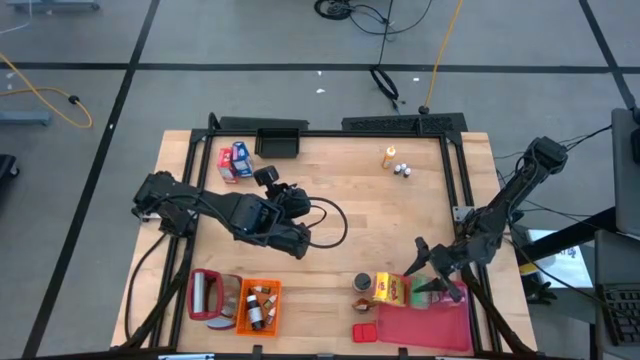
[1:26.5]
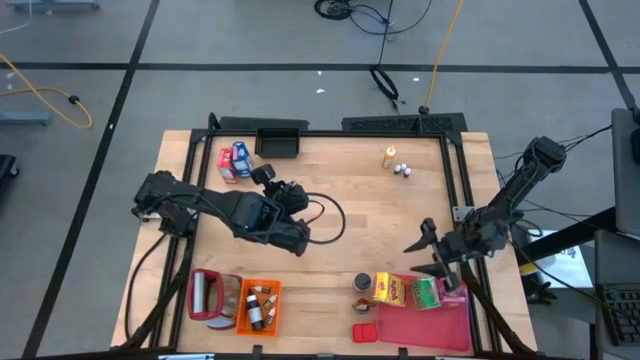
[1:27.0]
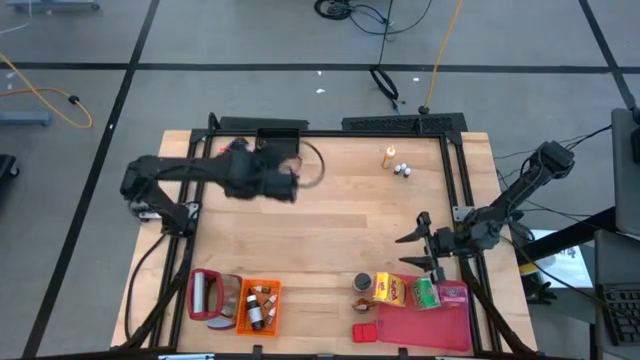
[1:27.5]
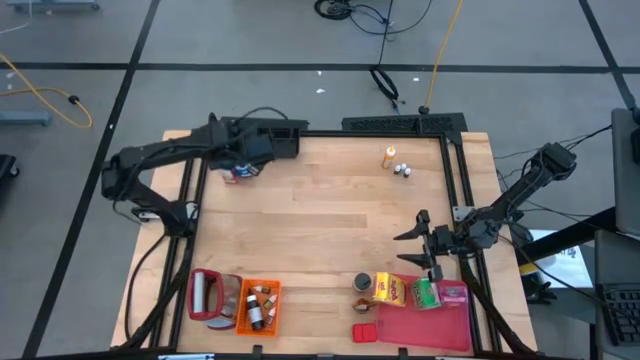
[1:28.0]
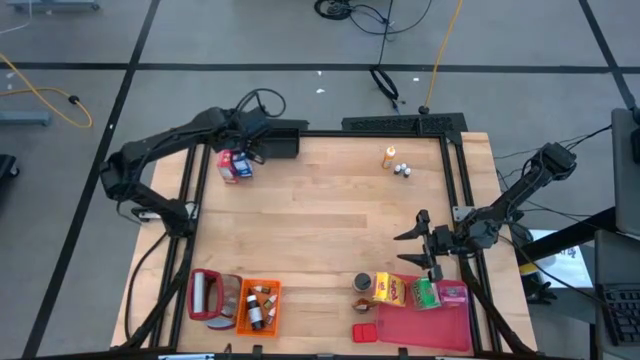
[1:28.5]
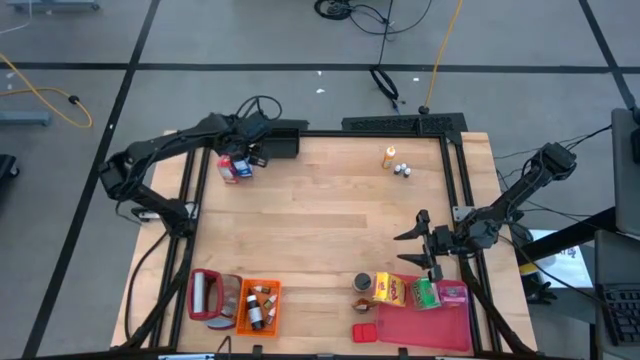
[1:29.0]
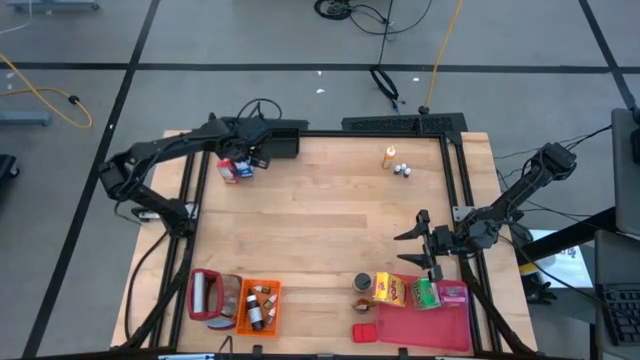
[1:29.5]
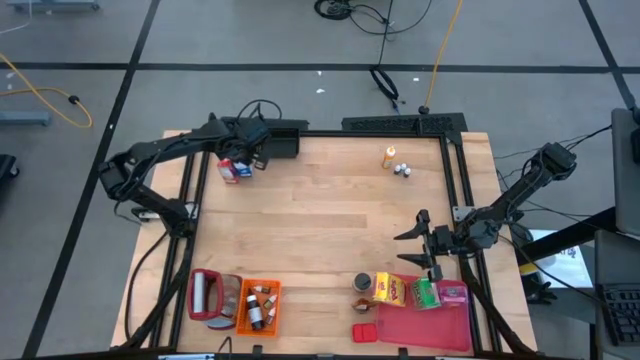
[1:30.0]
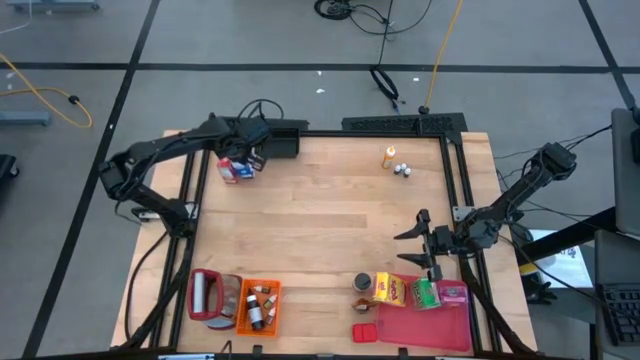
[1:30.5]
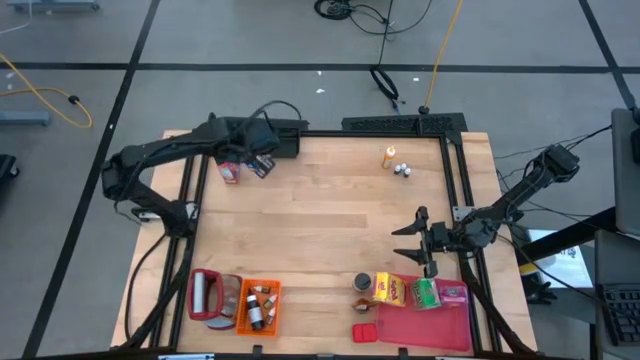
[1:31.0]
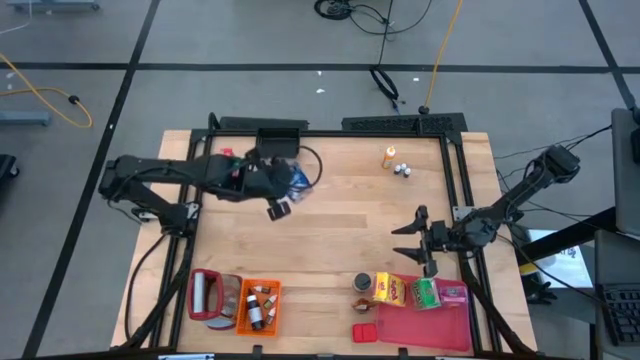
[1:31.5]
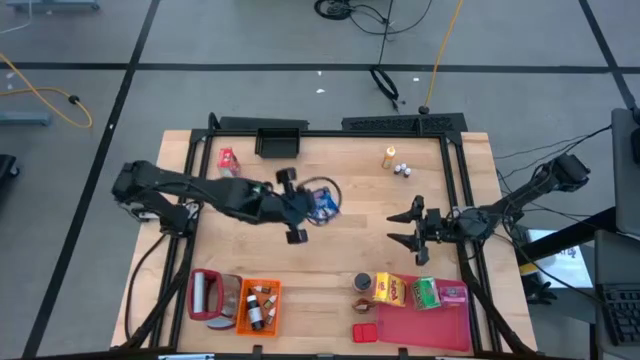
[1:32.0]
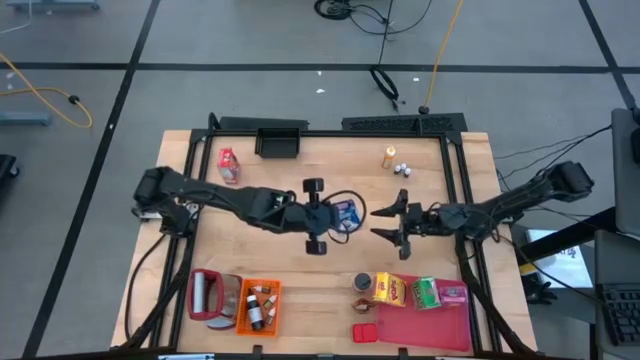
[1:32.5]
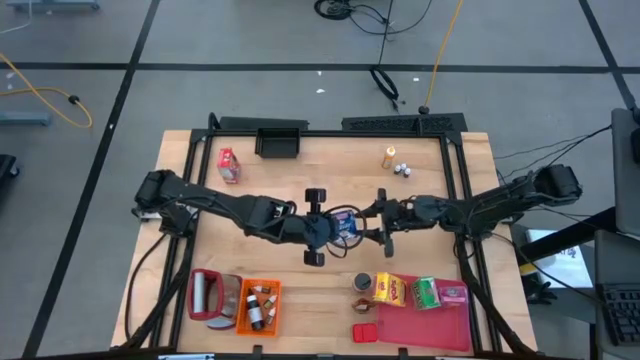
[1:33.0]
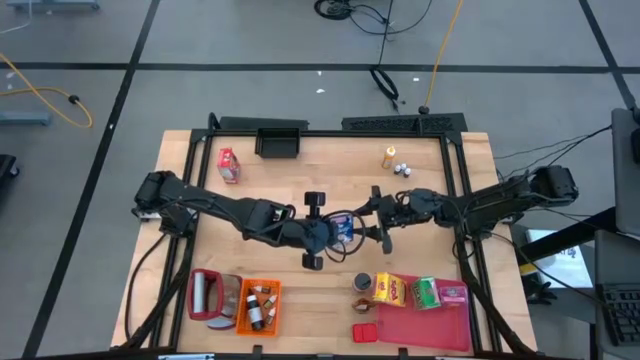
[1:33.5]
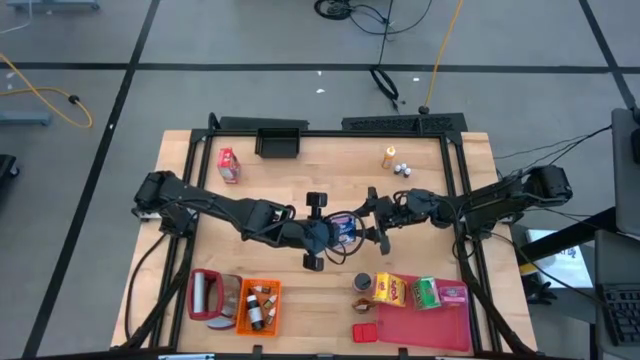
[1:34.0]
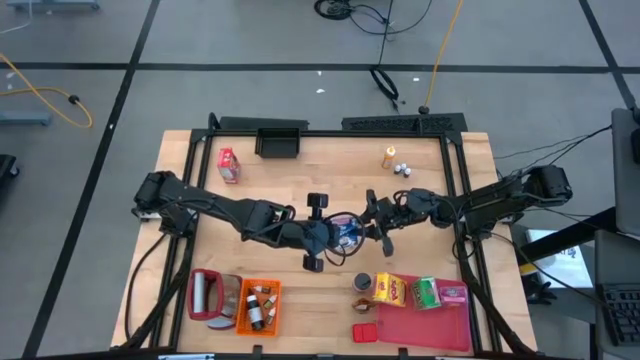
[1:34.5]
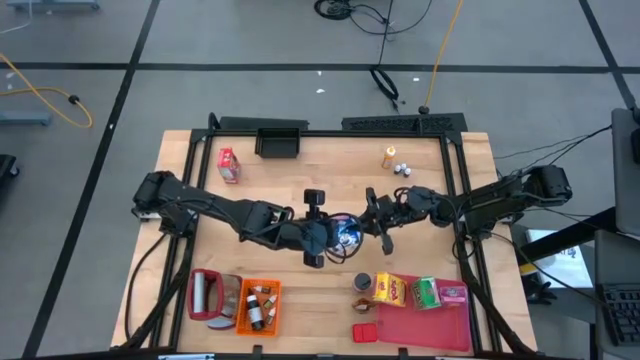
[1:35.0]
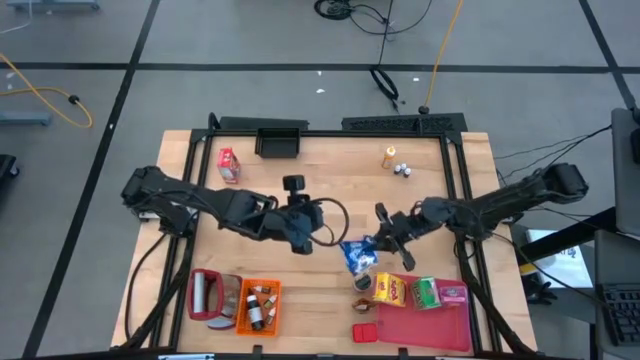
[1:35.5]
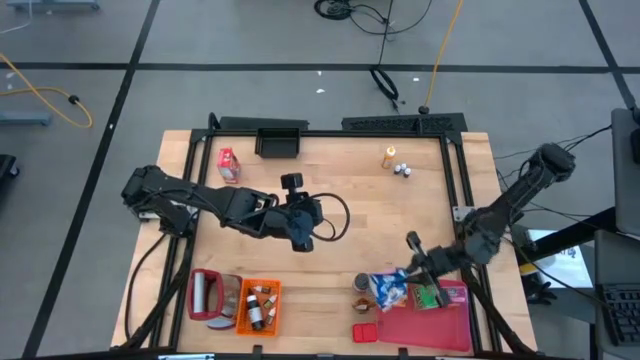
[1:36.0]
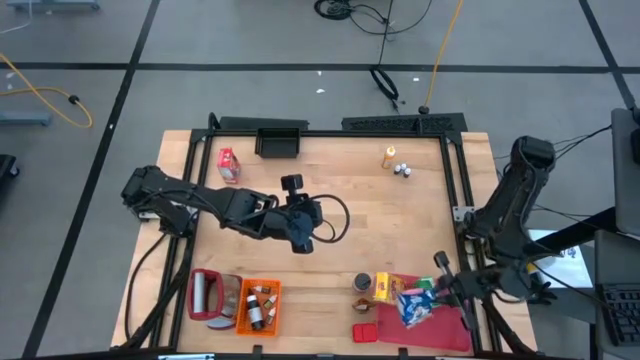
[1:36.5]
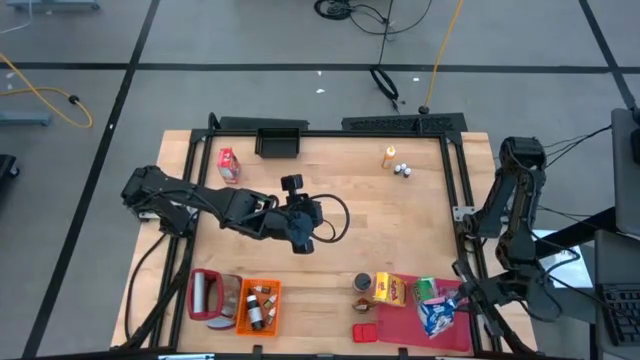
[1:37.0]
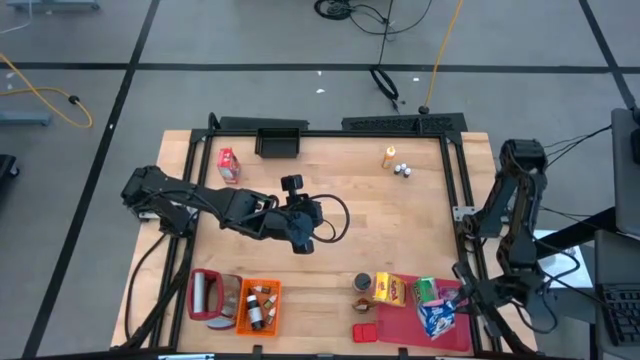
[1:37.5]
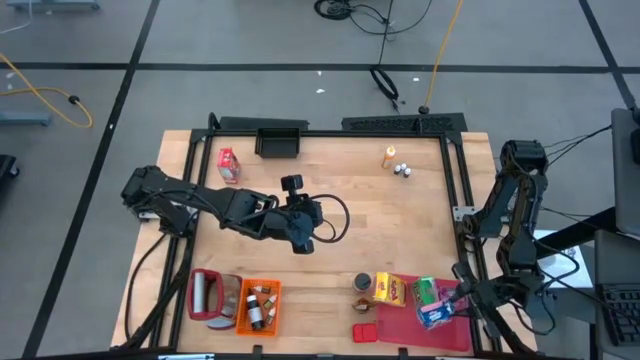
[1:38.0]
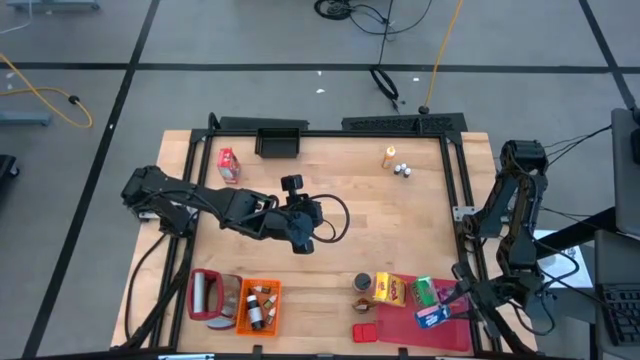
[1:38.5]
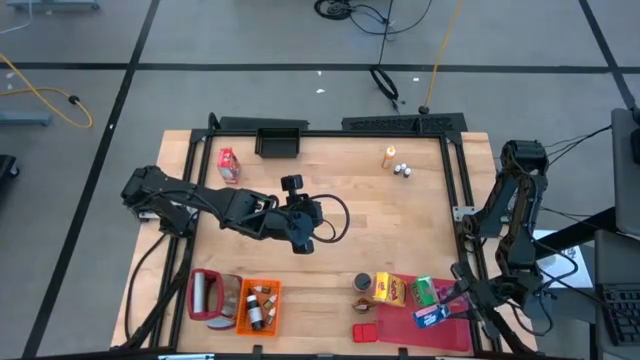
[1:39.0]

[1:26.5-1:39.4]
Task: Pick & Place Kitchen Items
Put the blue cereal box into the red bin

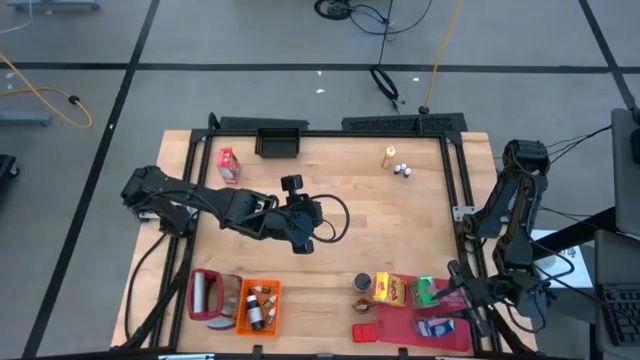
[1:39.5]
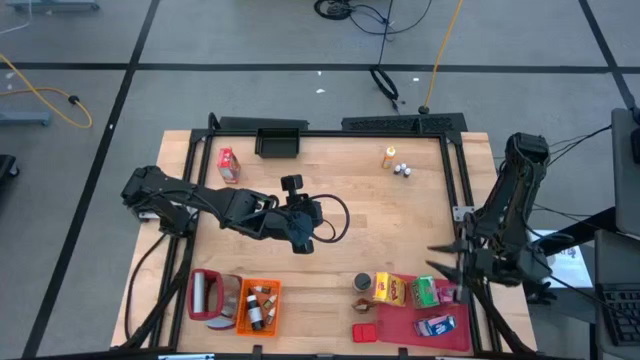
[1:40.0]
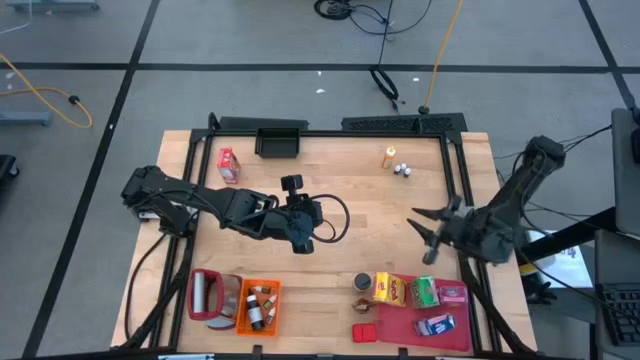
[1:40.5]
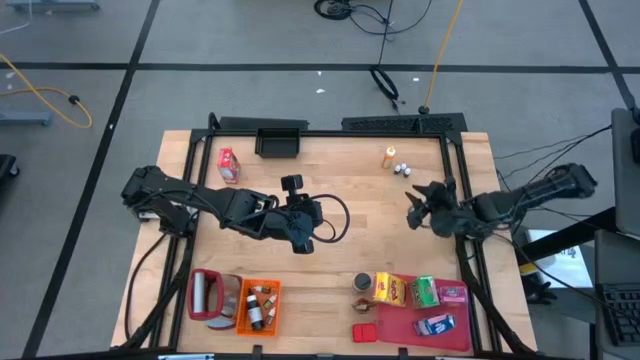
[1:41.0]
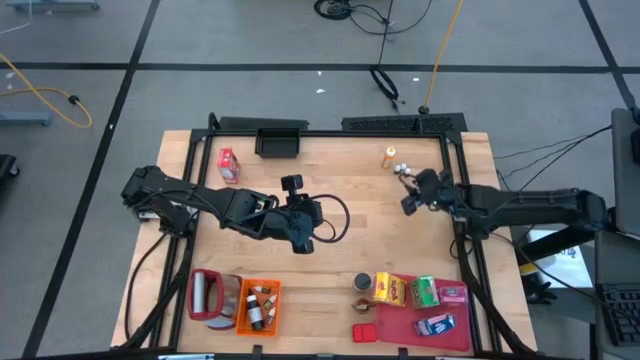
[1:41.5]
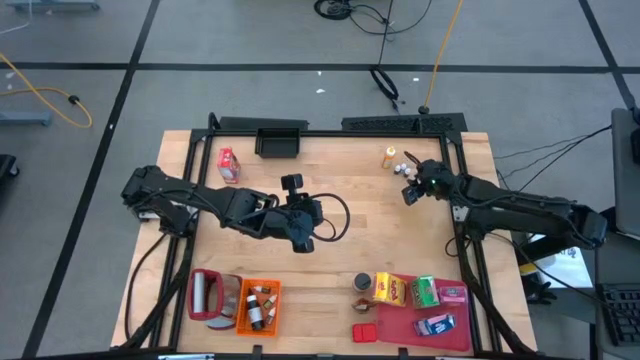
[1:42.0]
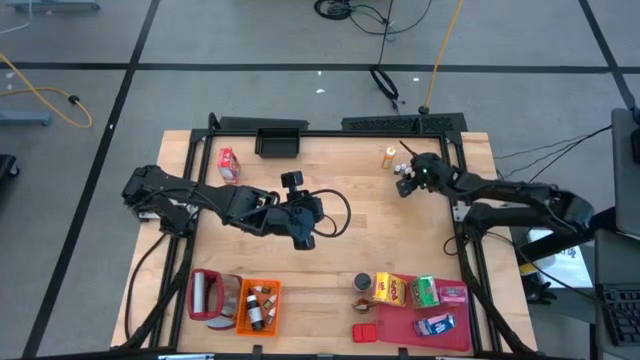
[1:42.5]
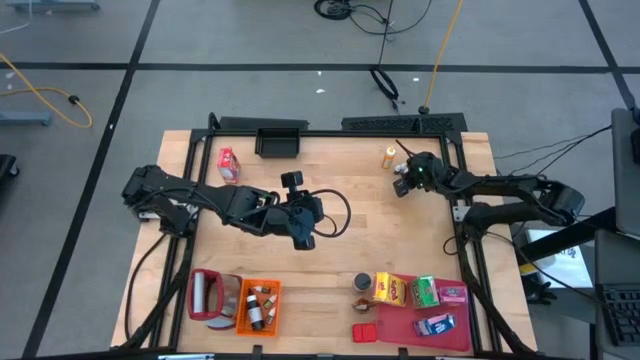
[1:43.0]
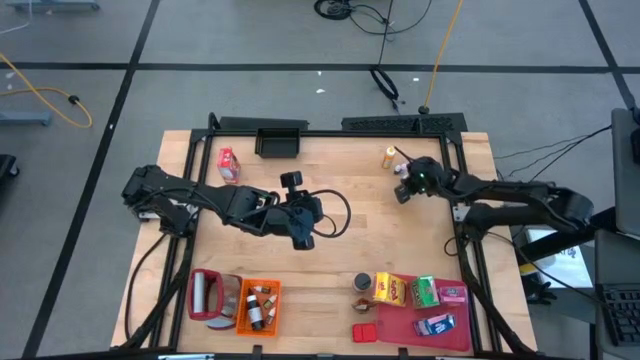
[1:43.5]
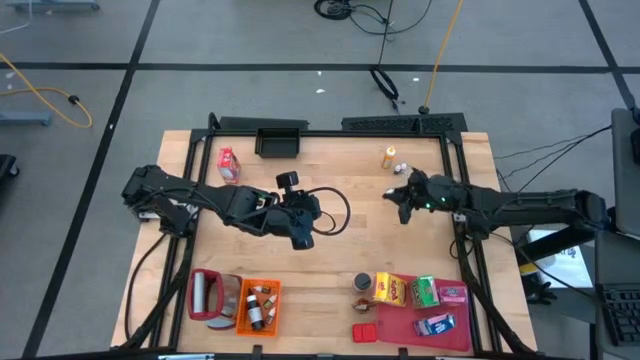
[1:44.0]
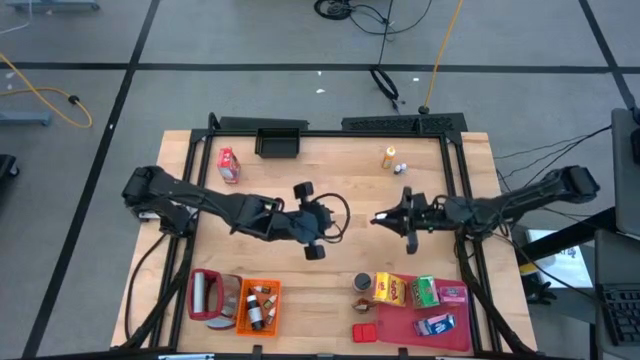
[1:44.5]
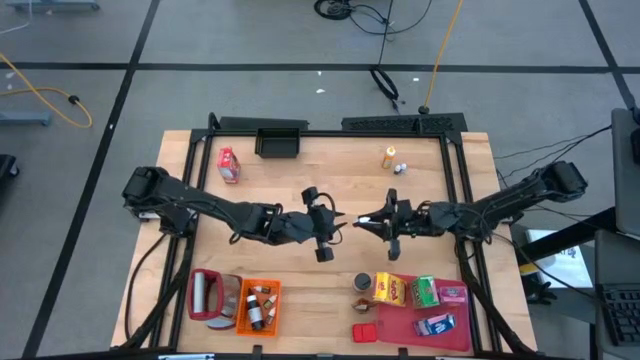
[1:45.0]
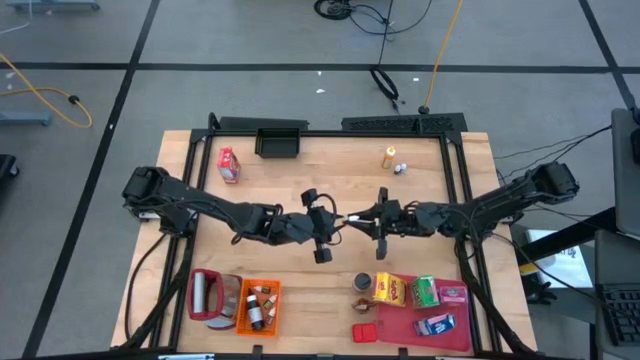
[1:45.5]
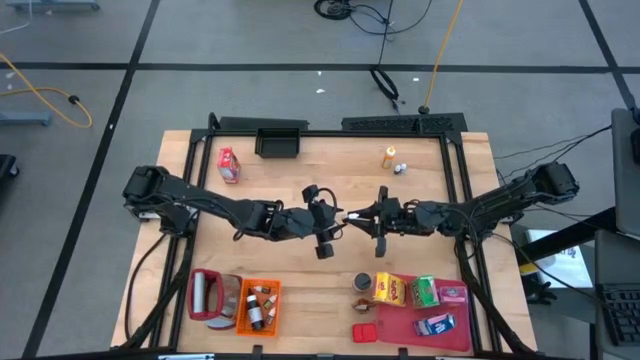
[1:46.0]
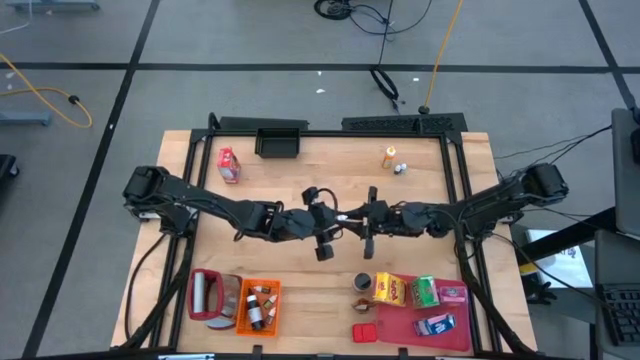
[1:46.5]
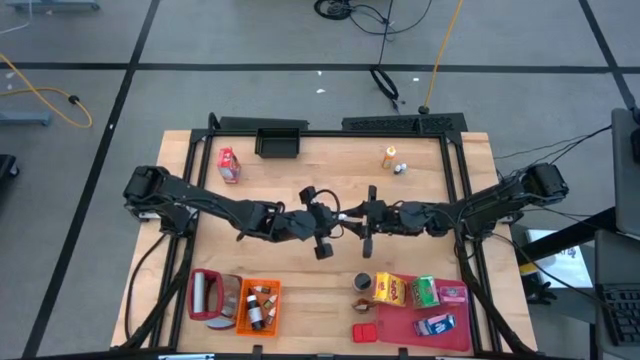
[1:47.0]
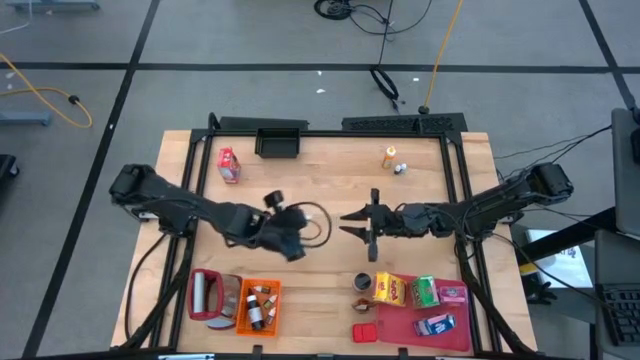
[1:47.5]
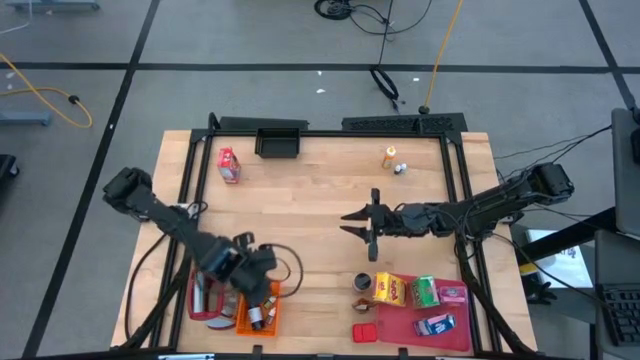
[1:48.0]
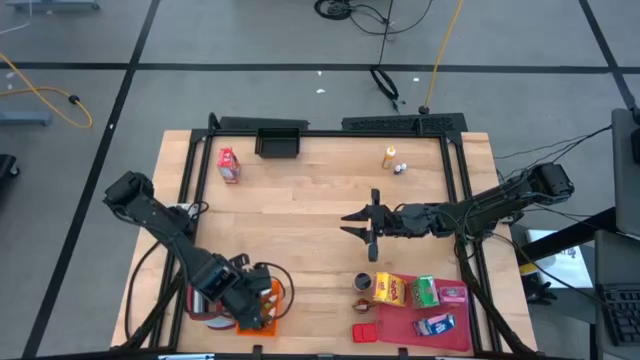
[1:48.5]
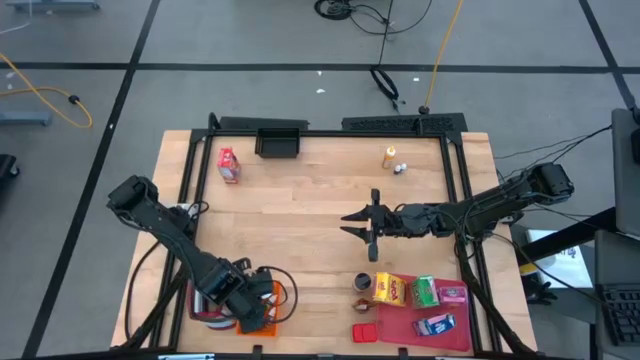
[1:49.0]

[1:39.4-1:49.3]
Put the small red food coloring bottle into the orange bin
